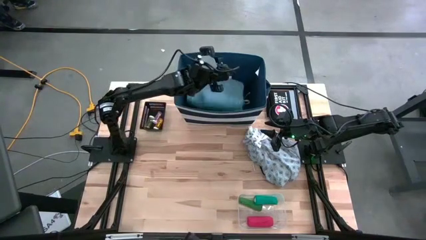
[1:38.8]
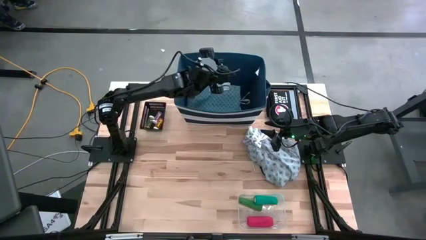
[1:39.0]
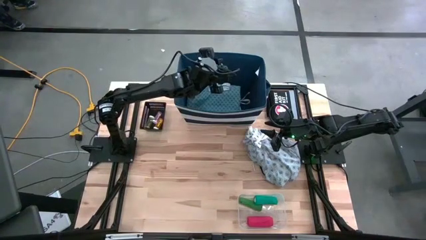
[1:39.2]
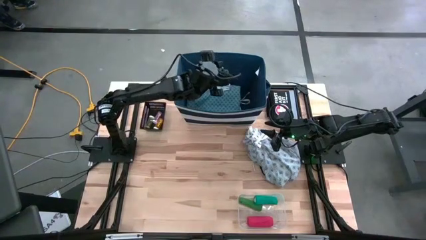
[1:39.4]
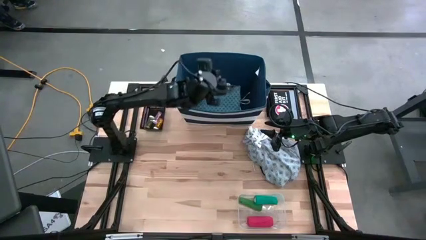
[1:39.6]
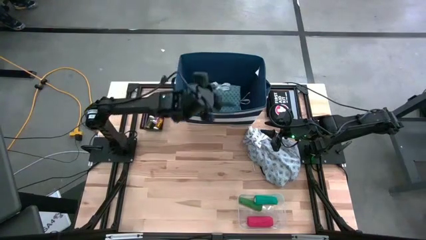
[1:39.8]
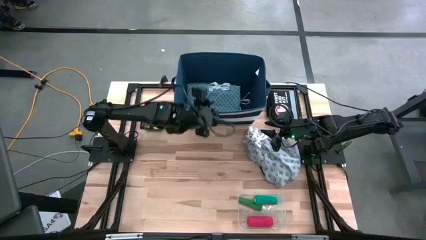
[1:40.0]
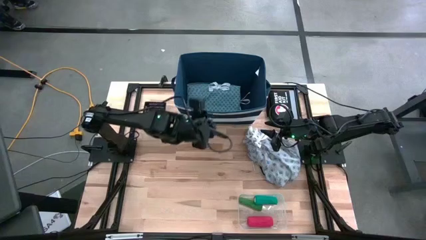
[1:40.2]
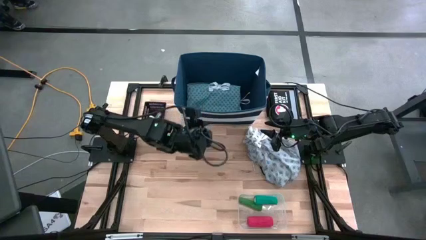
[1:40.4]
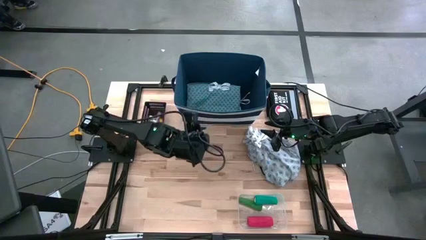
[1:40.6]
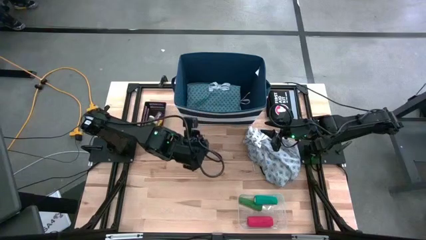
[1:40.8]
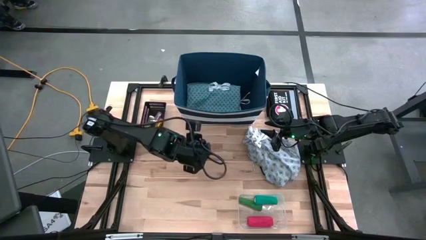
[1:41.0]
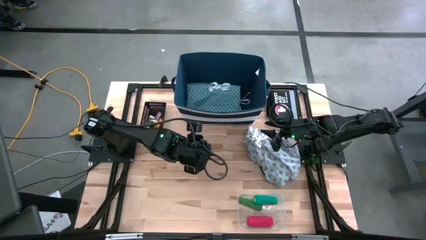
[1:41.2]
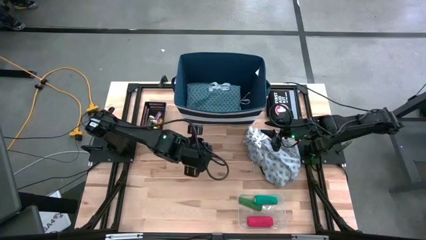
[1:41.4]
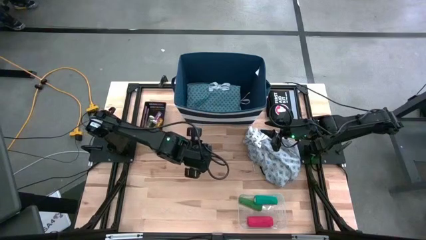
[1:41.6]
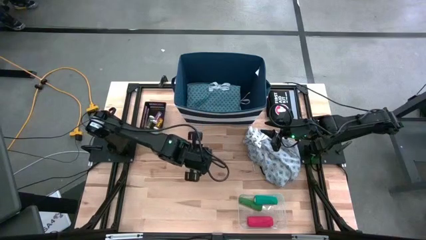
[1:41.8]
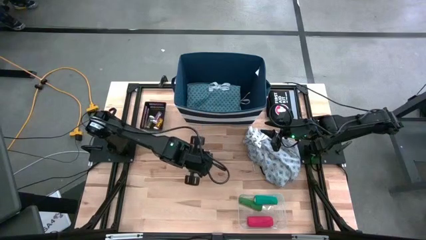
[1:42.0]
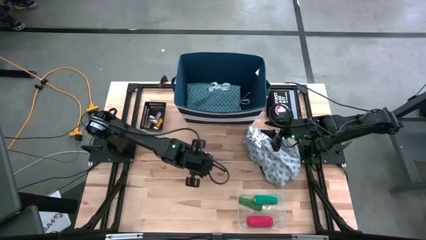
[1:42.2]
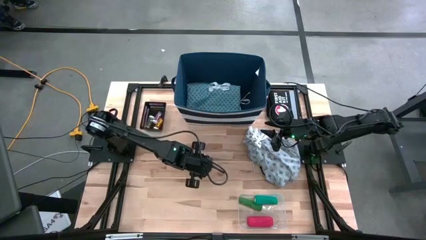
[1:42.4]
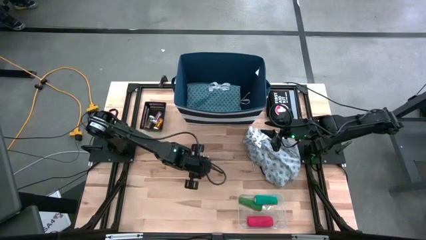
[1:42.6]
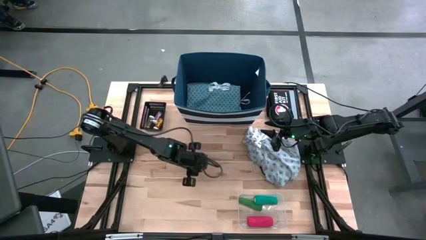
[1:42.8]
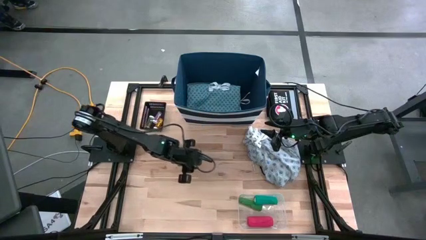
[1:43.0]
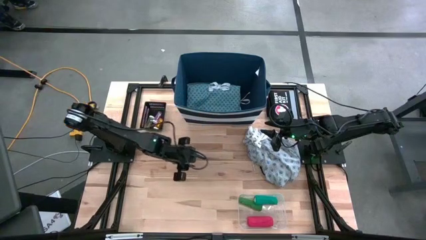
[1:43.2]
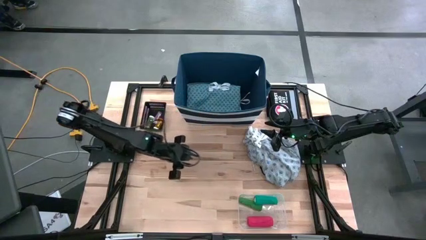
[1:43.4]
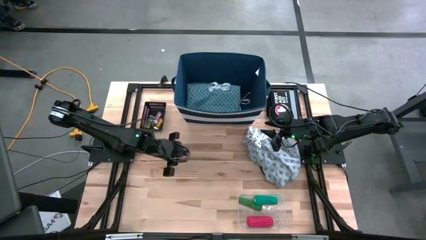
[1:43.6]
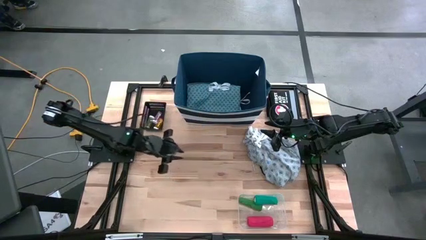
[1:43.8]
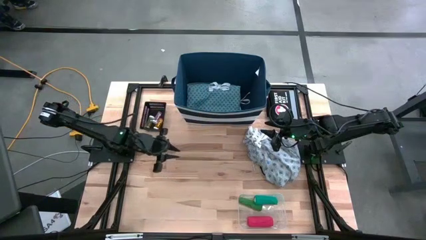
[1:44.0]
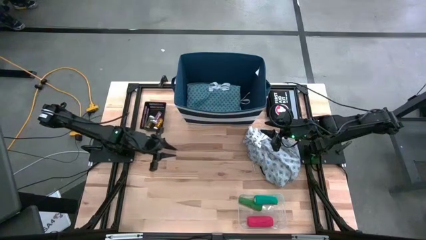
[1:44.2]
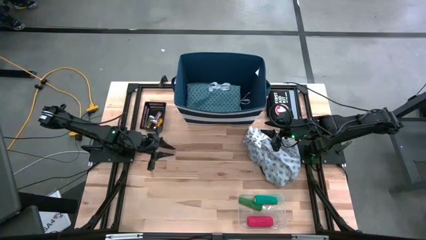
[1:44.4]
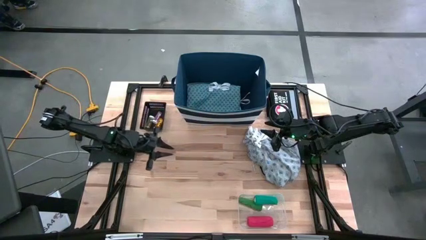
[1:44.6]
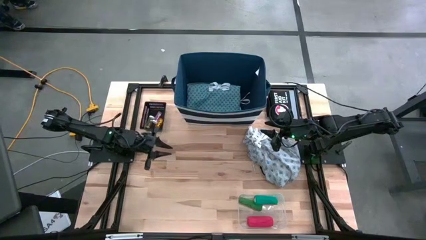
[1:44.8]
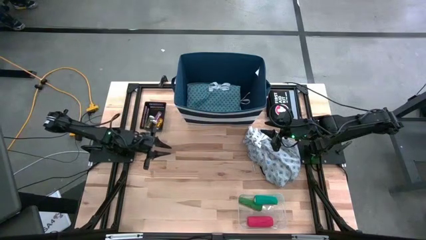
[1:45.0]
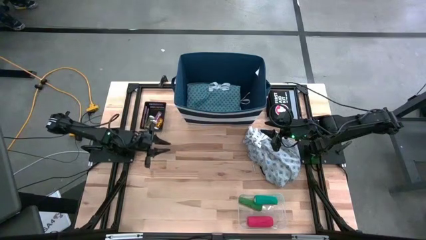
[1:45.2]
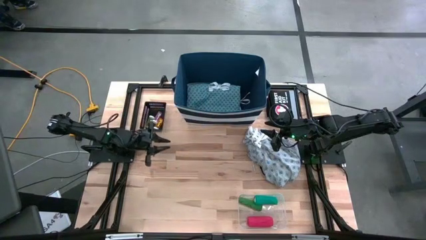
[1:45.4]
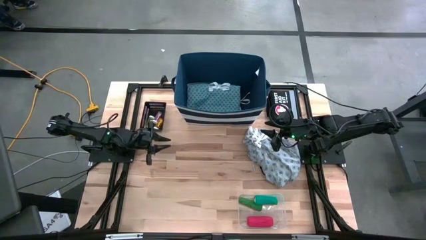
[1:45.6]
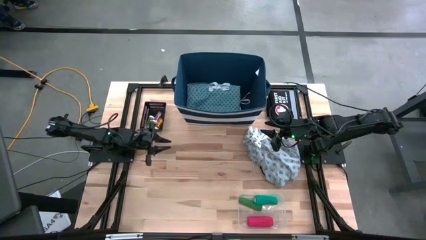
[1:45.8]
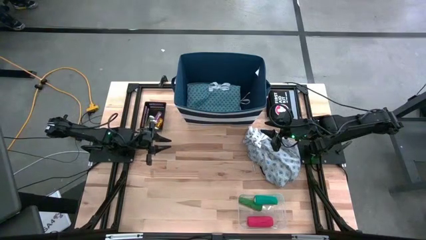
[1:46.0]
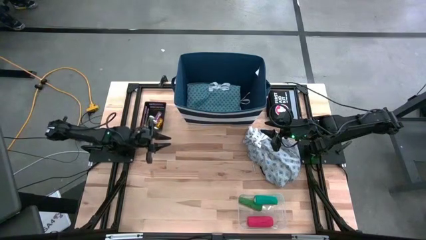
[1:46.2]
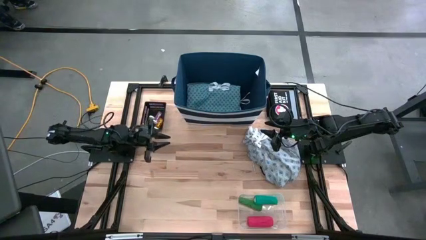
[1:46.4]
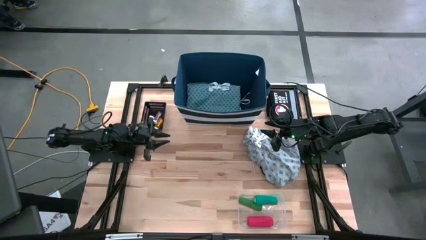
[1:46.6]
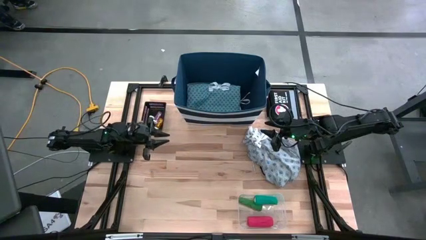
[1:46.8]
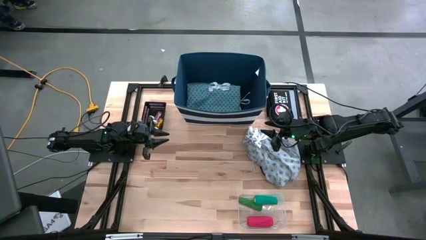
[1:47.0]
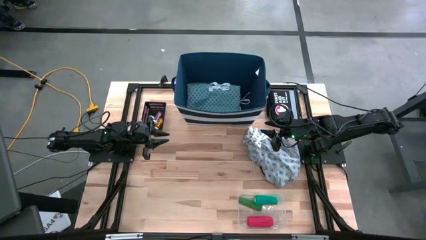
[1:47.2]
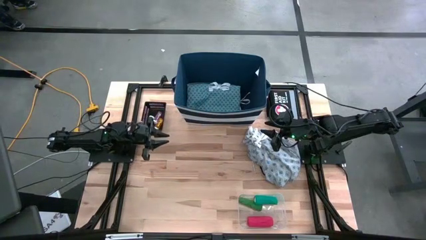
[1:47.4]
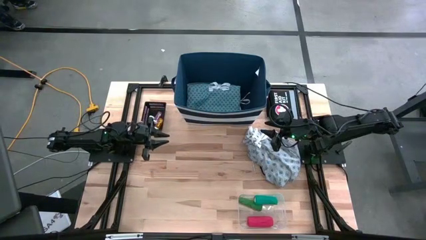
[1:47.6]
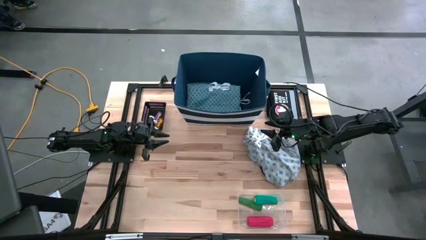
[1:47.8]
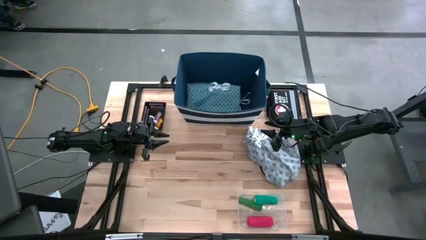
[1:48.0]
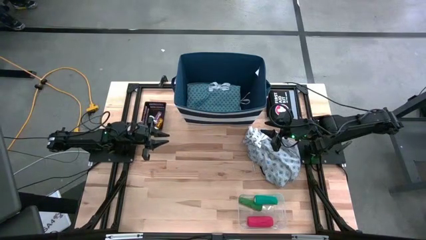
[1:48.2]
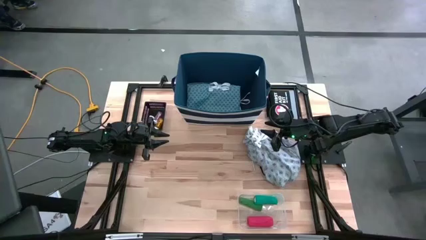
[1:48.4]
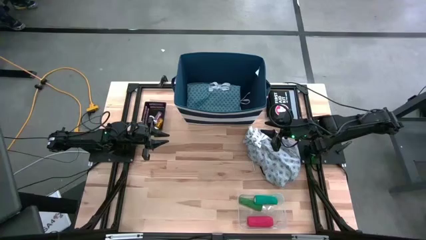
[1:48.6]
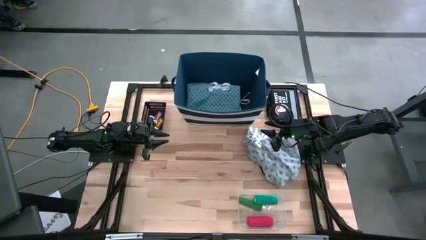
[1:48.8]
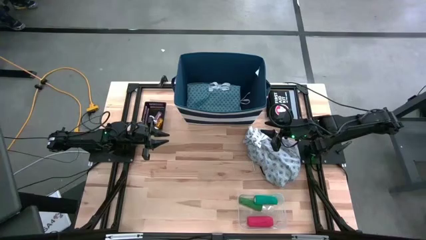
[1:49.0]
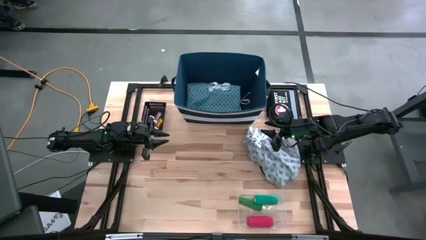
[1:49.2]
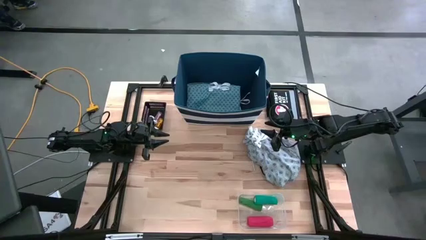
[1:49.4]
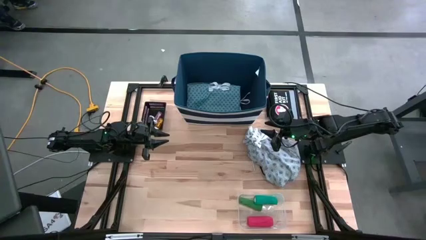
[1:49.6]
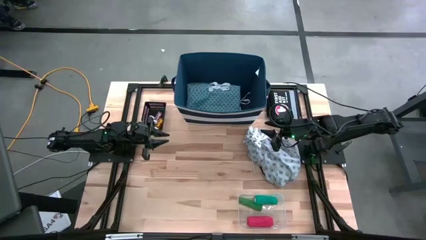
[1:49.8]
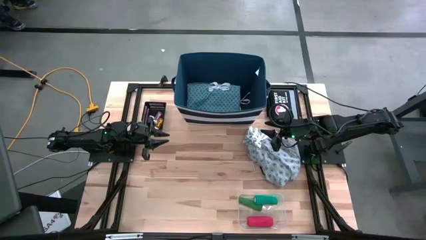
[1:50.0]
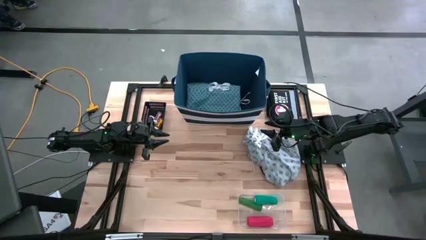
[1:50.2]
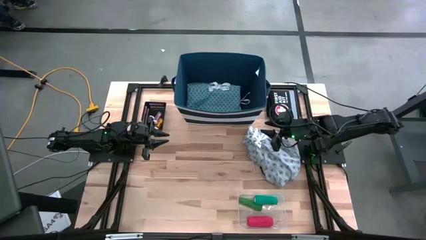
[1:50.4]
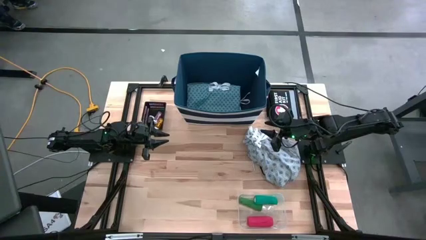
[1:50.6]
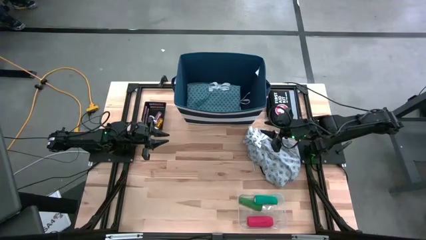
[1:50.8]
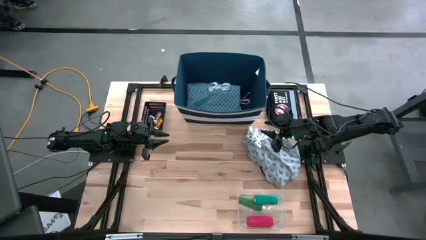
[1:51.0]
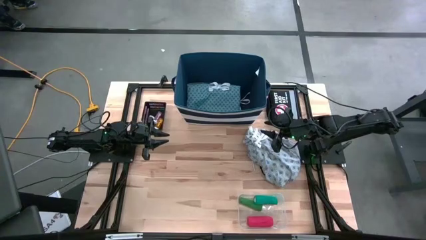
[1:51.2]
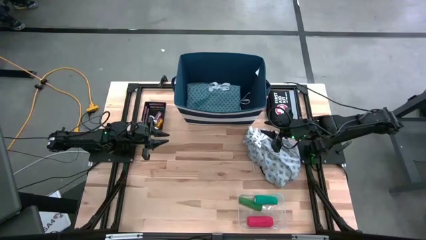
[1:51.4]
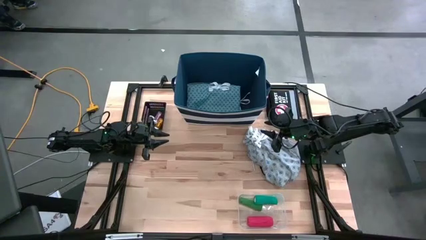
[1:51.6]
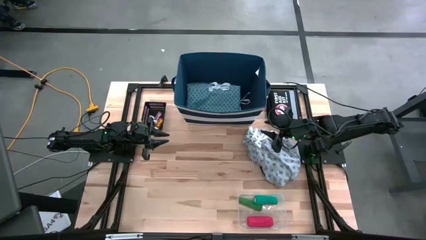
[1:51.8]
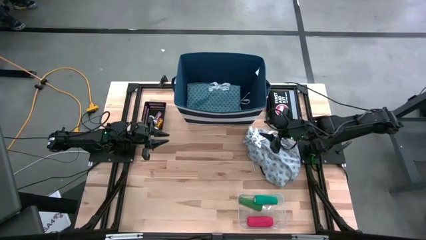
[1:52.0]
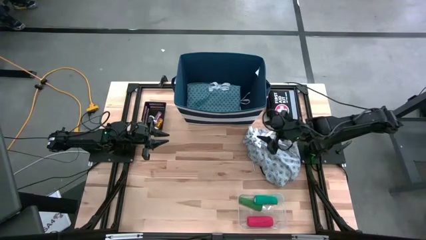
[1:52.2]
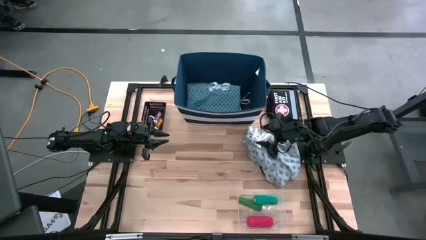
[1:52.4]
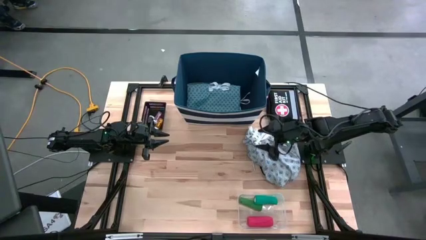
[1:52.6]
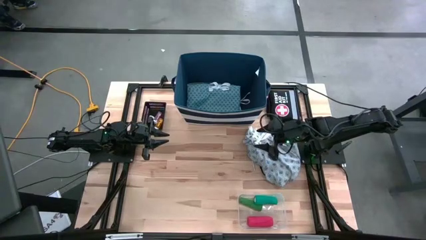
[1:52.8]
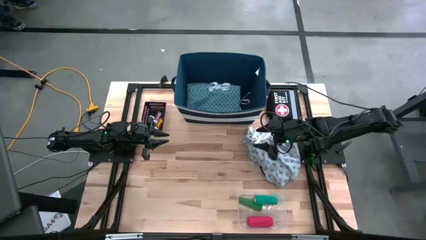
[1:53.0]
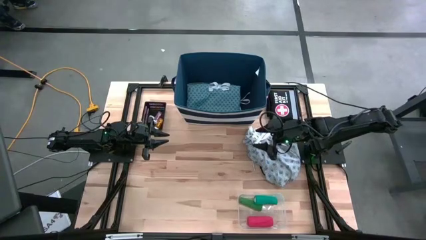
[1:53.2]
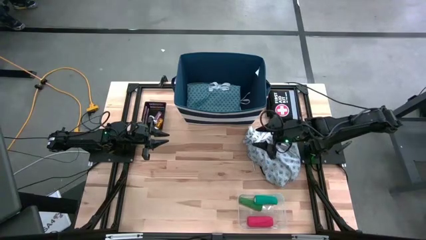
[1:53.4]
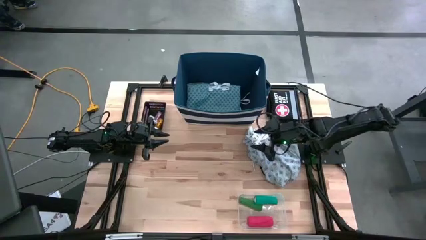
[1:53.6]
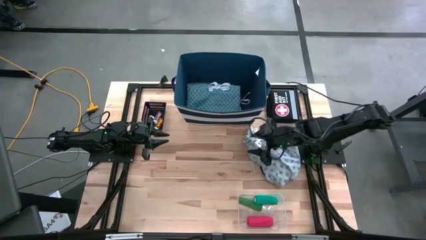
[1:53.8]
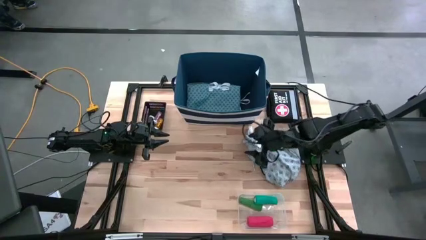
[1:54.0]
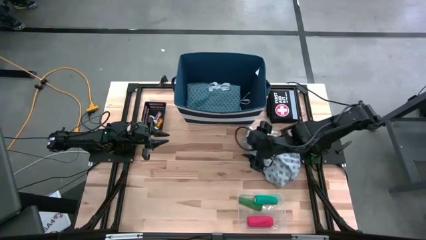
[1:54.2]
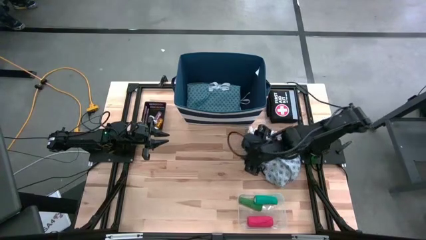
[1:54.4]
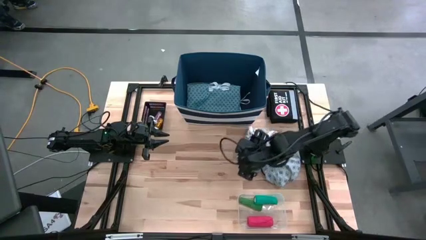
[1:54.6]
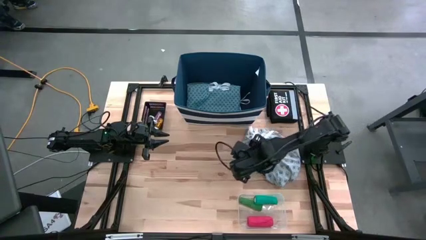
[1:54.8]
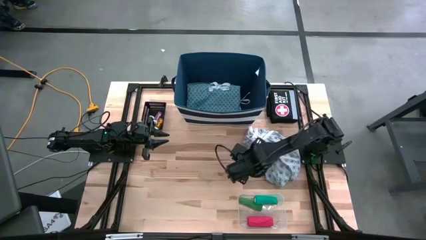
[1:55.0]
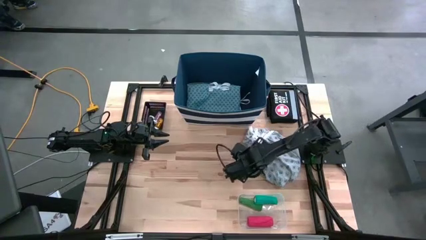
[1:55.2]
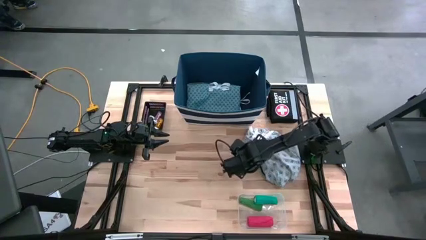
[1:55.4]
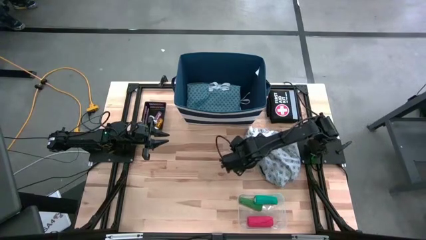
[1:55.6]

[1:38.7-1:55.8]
Task: Pick & Place Medicine items
Put the grey patient gown into the laundry bin
